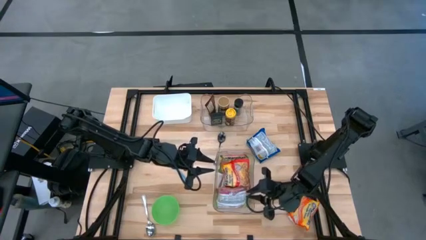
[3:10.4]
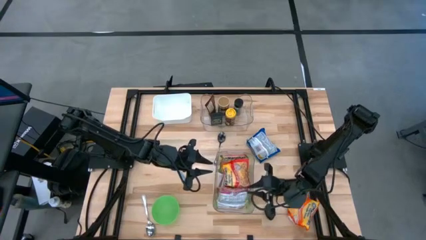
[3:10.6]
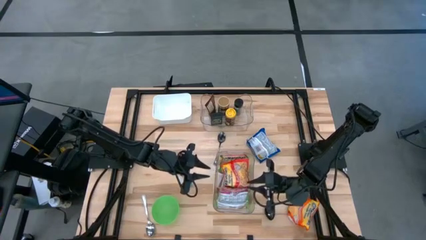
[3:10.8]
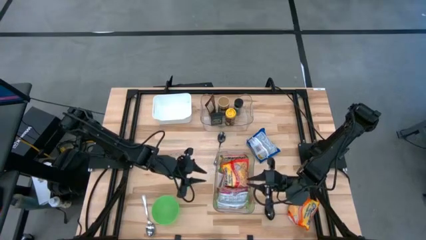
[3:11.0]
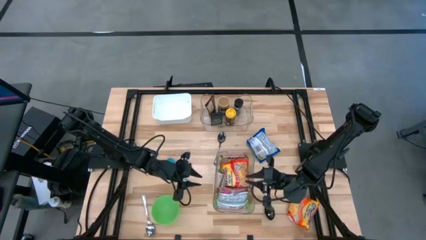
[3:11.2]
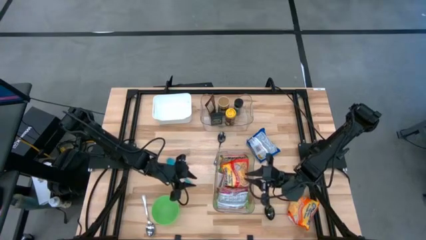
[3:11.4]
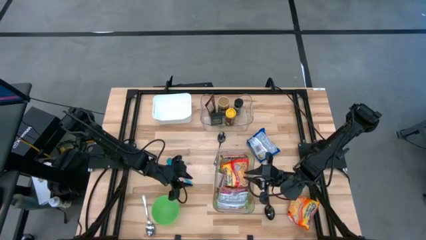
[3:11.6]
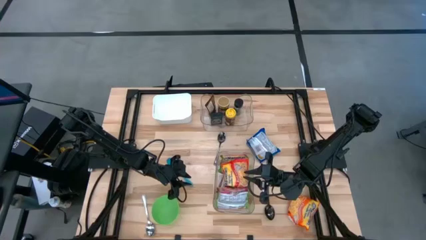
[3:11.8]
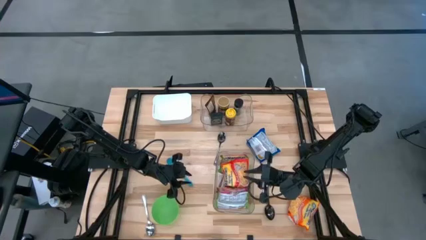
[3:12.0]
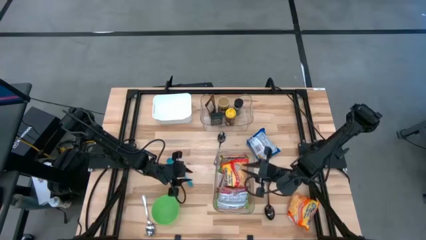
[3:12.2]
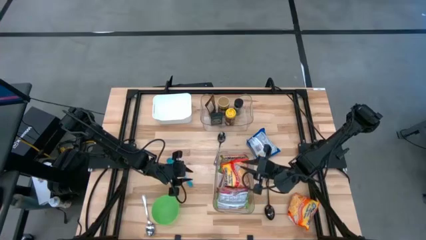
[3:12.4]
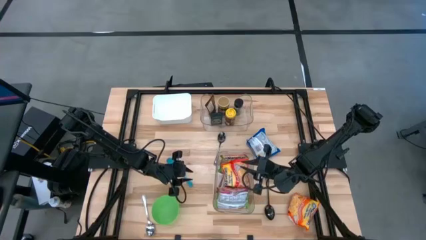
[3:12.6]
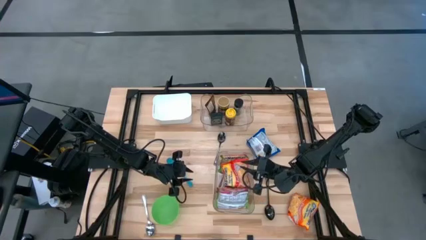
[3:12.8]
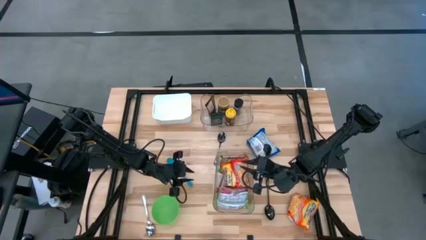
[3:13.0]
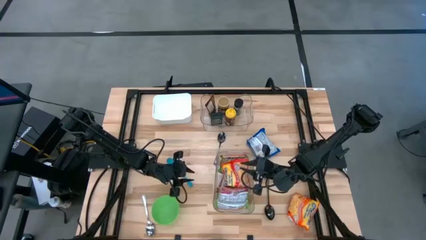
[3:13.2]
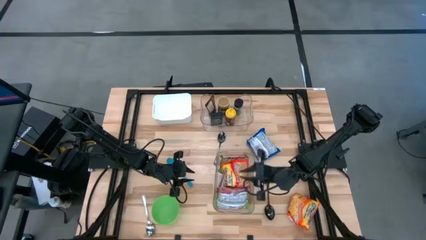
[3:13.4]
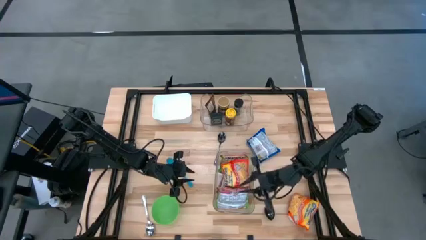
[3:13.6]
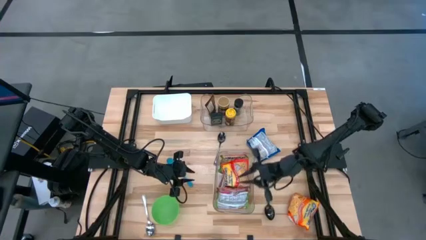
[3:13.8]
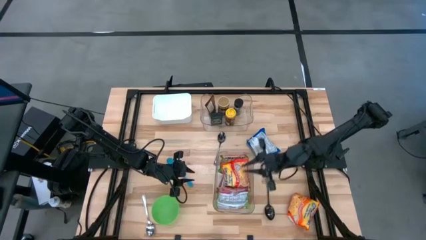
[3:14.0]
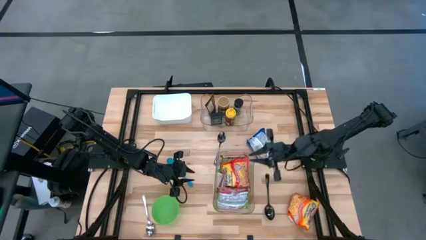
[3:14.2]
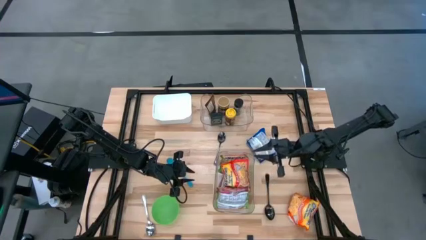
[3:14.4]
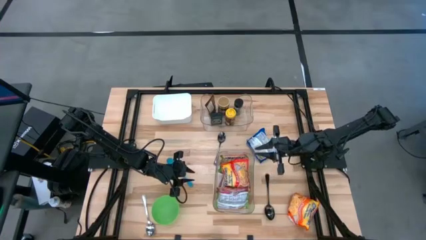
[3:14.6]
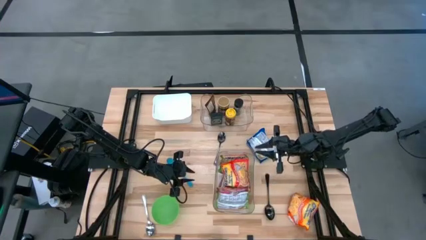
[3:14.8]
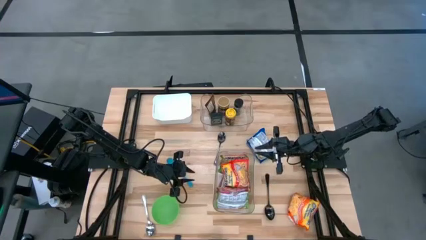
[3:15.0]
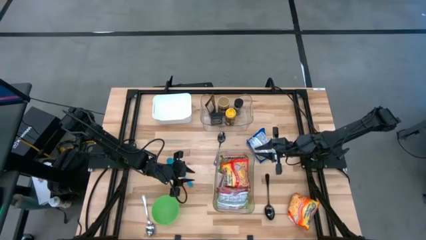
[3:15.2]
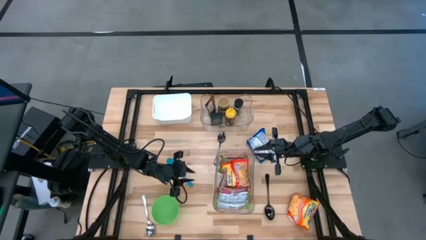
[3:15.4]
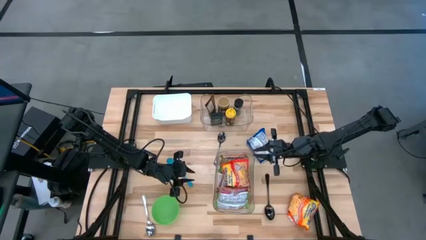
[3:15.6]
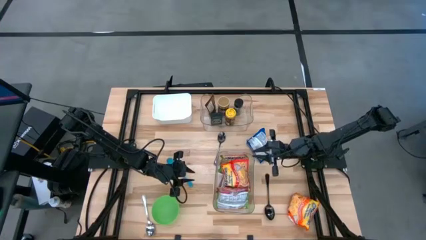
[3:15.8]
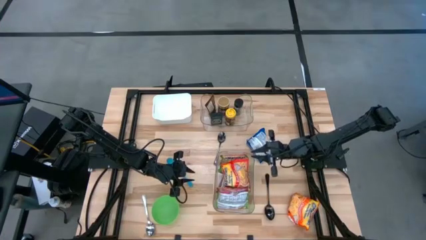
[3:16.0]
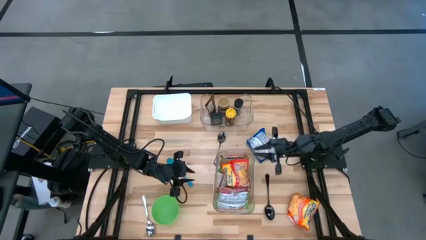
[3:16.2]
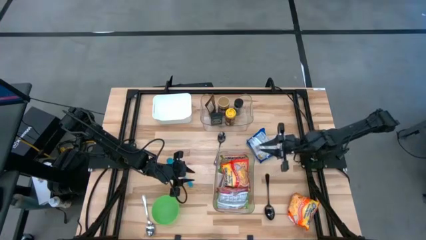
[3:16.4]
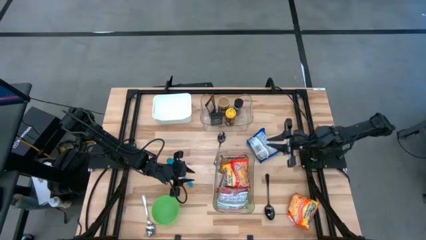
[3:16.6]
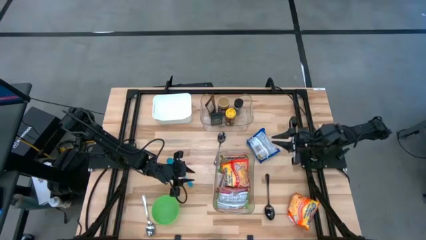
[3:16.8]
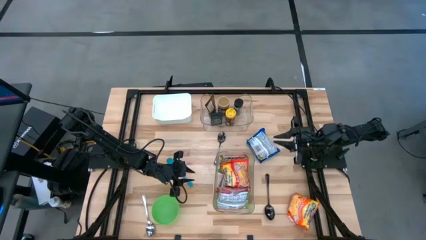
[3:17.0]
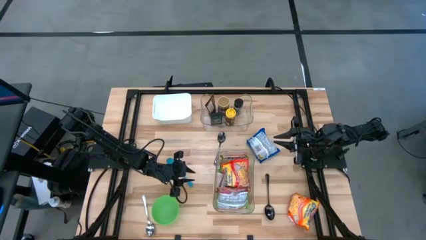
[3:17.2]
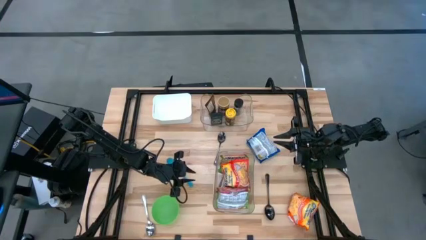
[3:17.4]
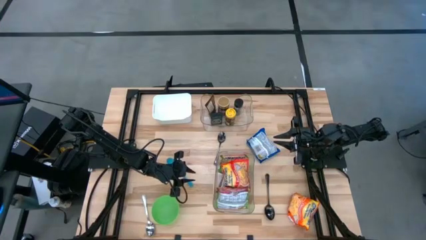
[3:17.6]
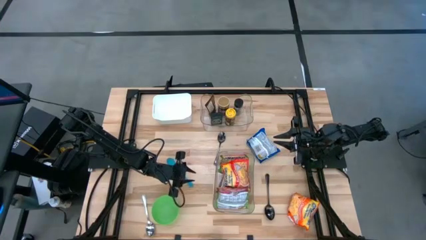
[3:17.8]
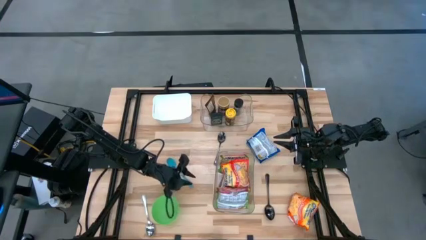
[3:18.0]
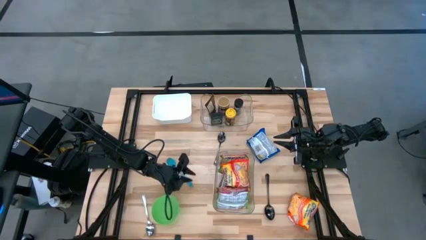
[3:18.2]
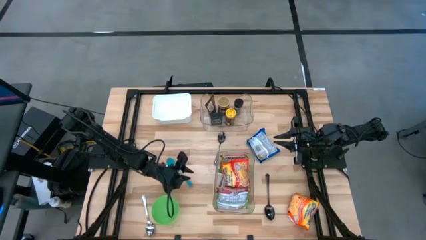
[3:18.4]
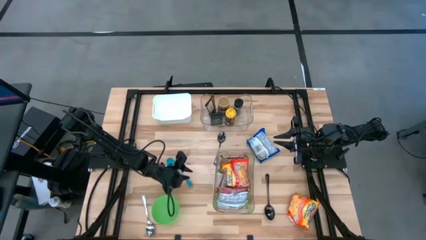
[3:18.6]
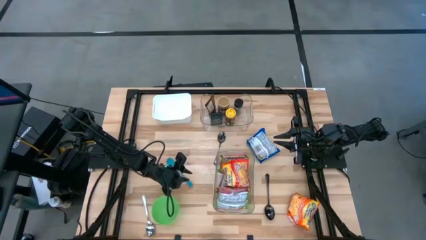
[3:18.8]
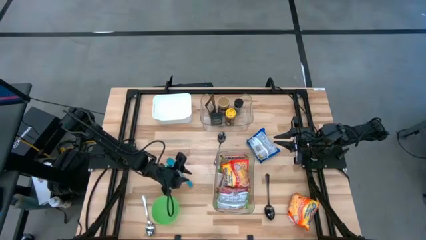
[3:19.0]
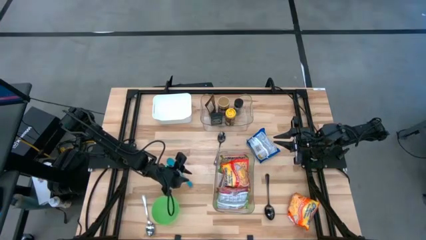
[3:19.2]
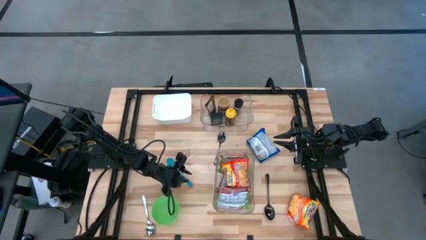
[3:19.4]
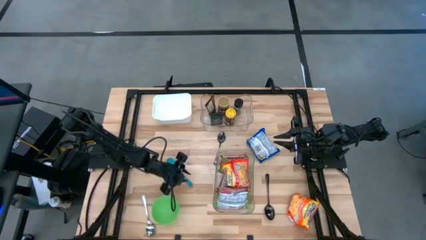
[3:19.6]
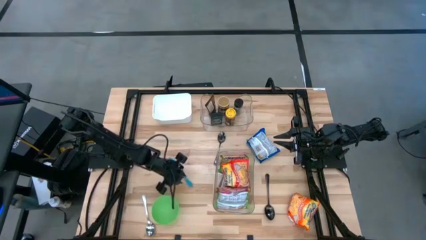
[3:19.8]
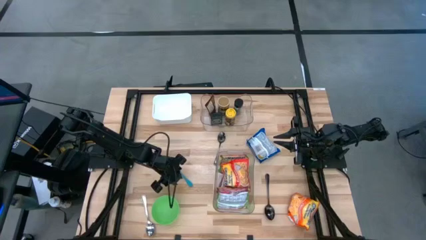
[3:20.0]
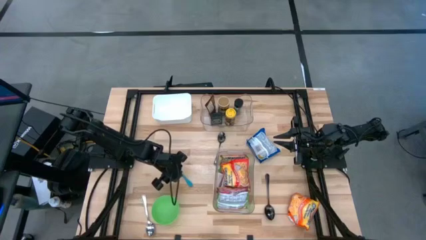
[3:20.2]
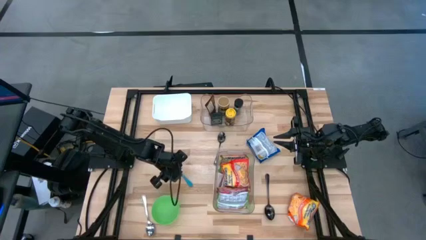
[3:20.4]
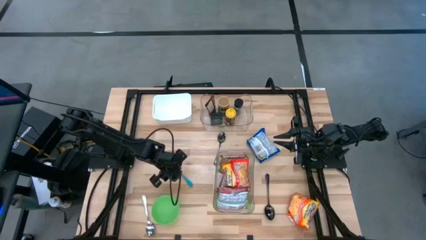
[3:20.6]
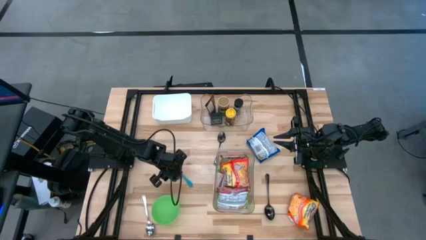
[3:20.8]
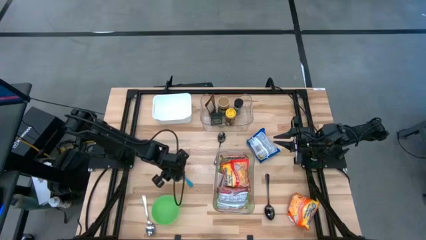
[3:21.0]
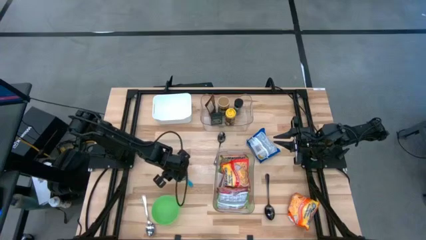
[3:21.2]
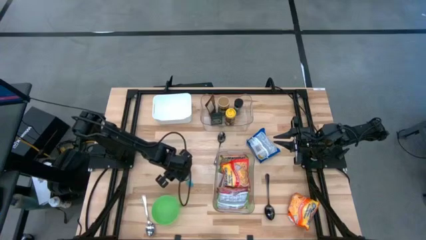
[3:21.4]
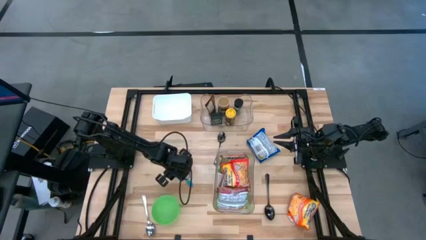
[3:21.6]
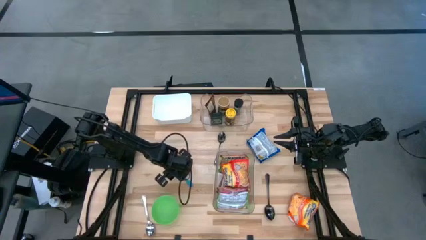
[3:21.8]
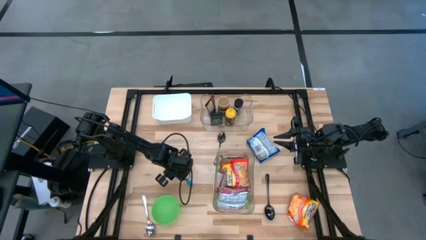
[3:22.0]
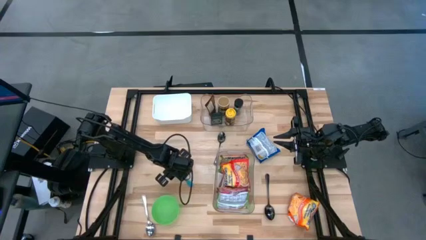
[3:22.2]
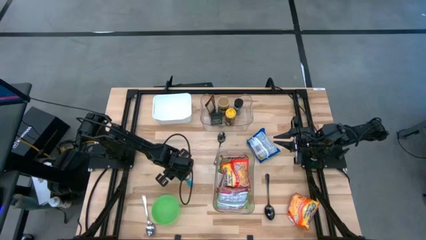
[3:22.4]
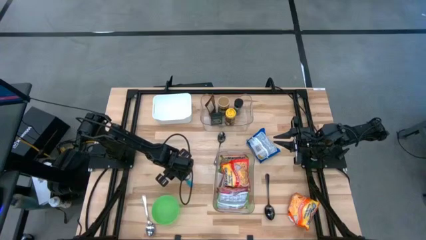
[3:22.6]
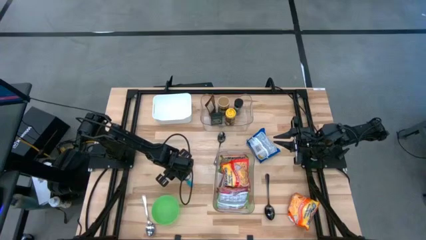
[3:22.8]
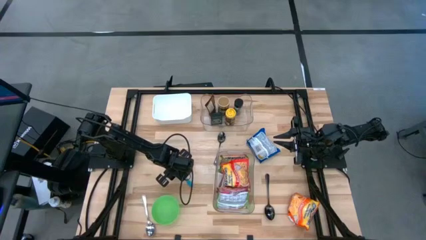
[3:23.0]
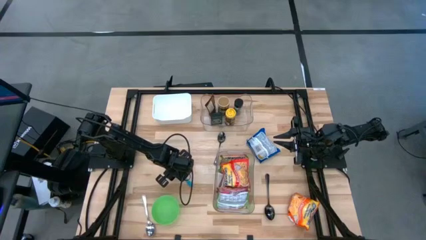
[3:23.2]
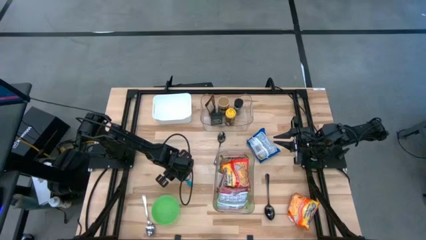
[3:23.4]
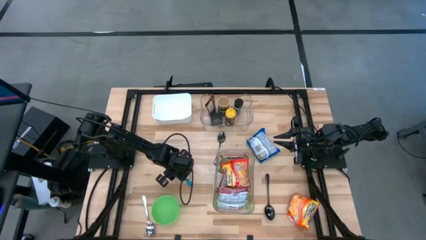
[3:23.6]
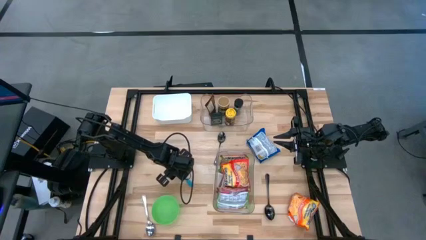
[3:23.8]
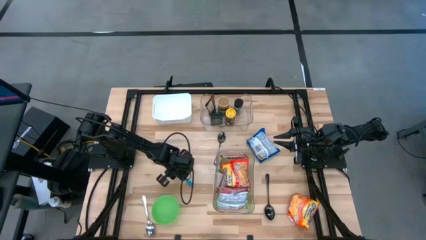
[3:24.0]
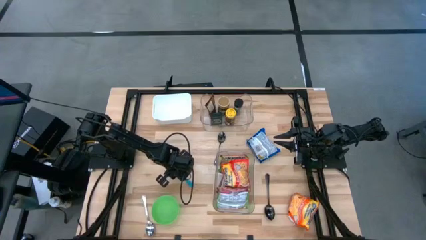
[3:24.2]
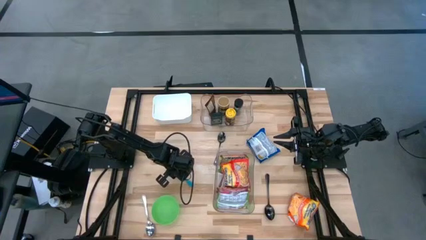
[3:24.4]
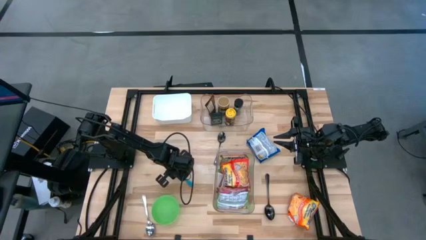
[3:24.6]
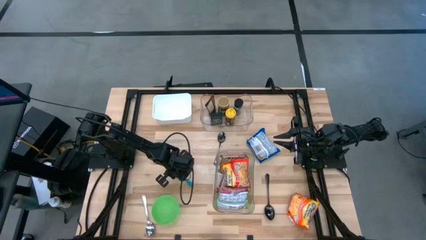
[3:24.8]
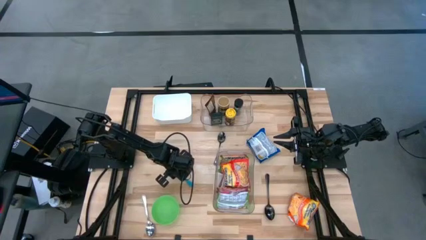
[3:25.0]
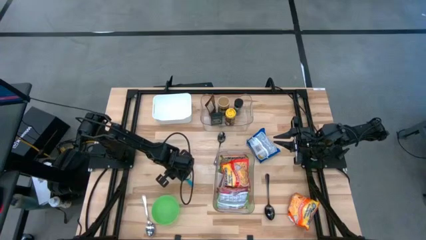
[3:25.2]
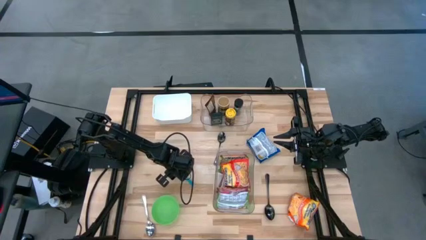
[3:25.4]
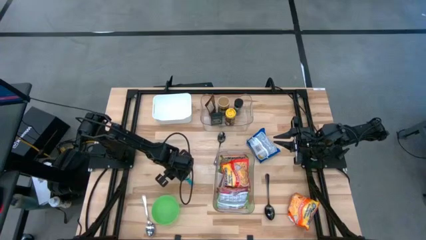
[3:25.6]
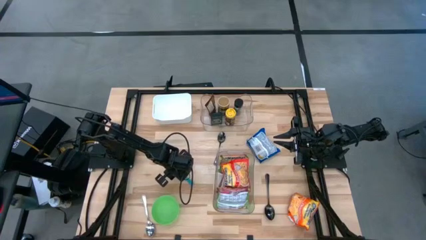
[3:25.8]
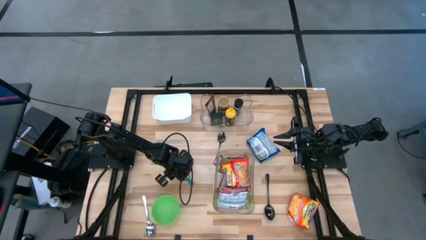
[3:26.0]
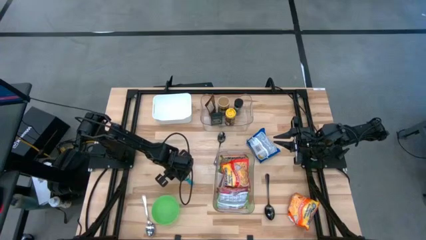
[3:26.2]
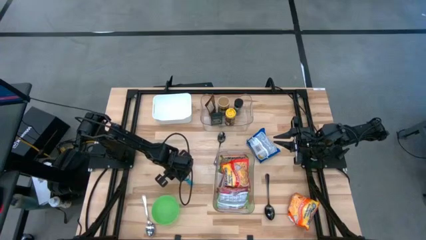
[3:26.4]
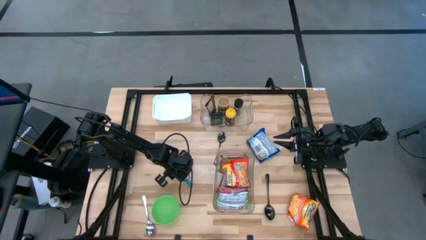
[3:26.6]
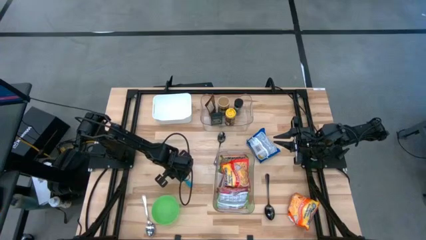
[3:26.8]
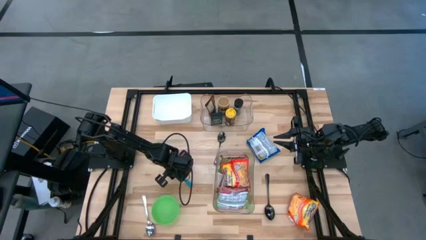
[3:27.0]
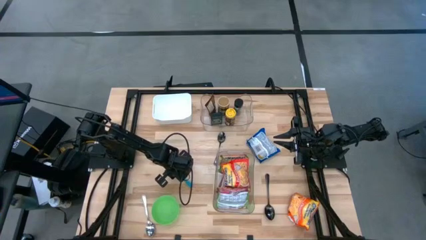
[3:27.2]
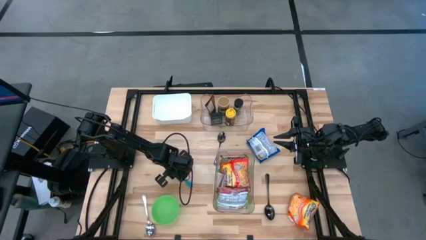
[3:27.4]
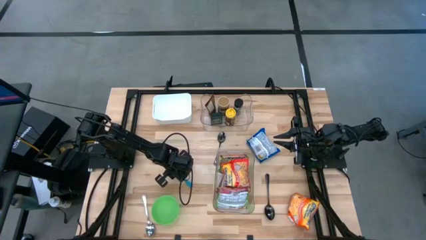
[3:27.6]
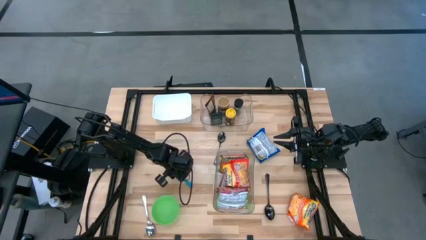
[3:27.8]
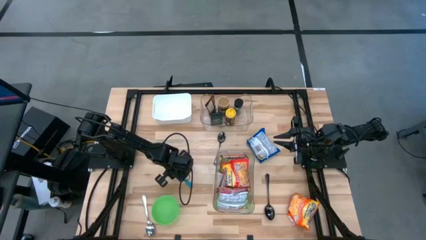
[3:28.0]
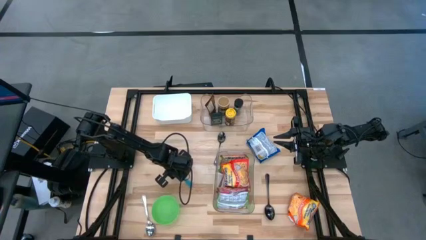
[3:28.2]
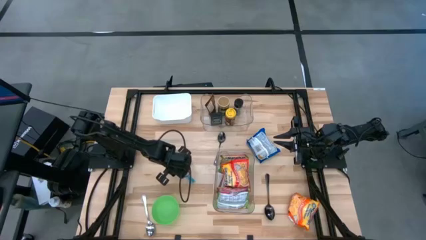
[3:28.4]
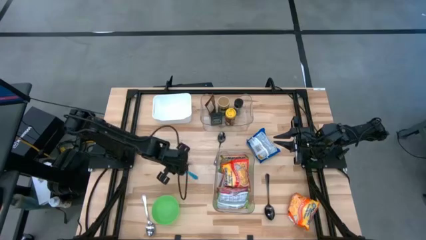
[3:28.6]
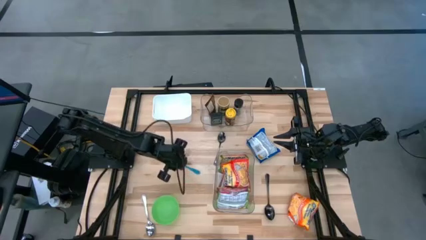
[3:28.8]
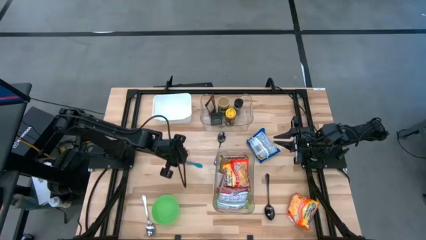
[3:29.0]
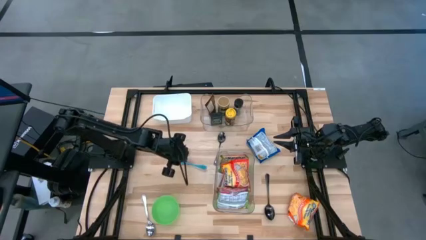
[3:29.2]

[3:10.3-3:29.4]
Task: Pick & Place Food Item
Put the blue spoon into the white bin
